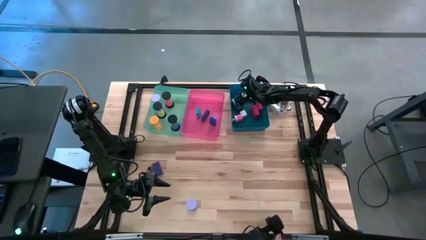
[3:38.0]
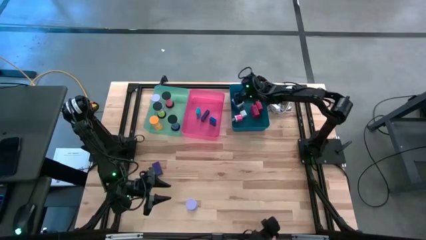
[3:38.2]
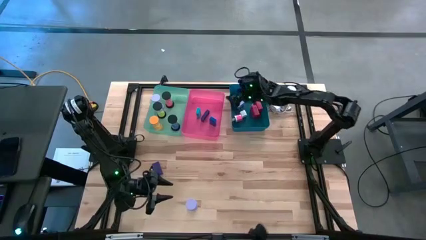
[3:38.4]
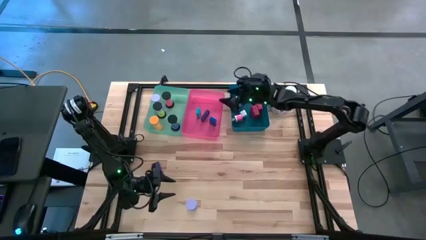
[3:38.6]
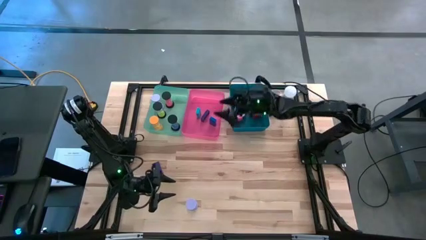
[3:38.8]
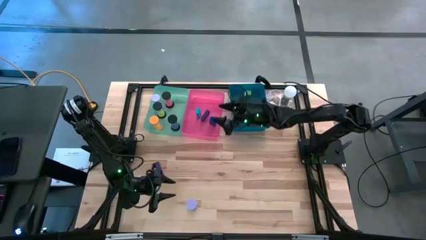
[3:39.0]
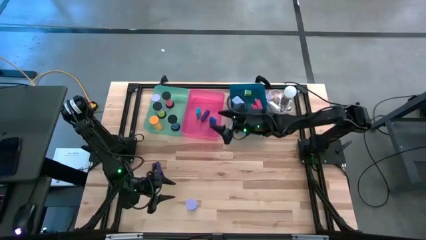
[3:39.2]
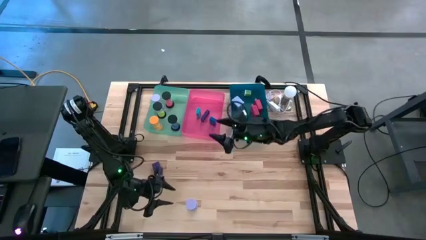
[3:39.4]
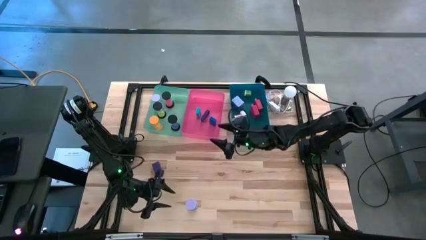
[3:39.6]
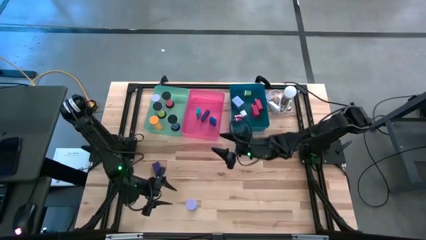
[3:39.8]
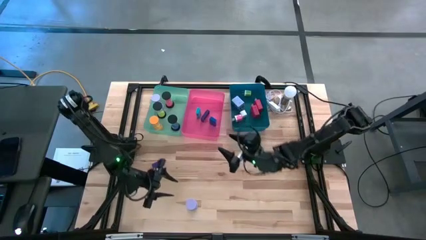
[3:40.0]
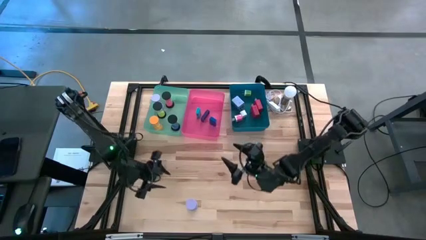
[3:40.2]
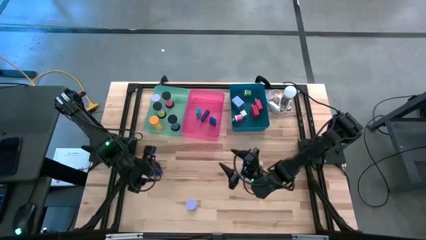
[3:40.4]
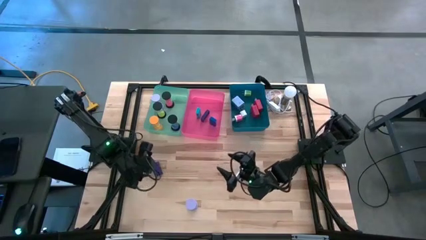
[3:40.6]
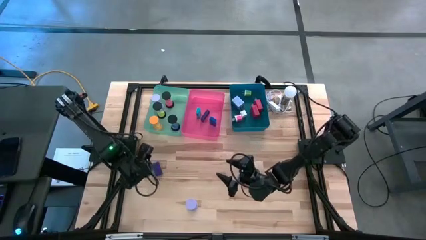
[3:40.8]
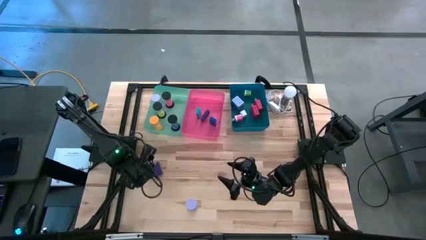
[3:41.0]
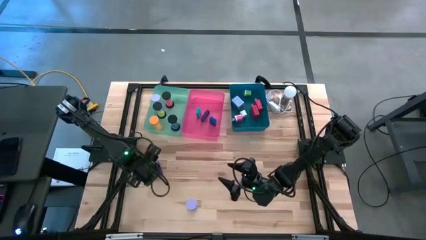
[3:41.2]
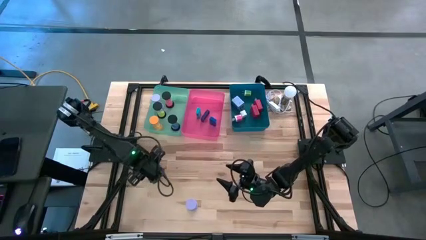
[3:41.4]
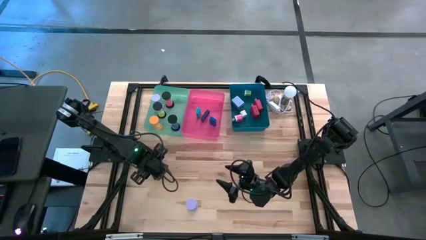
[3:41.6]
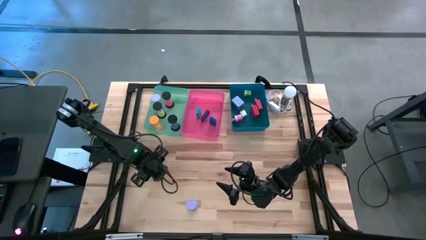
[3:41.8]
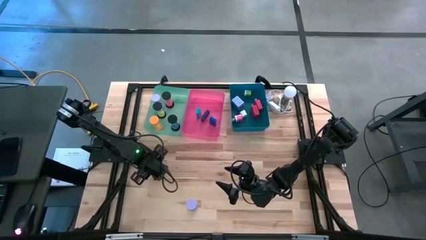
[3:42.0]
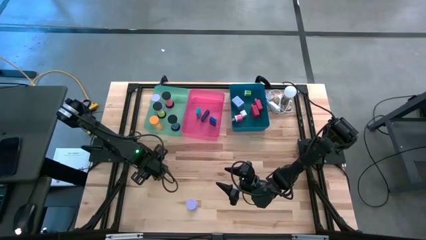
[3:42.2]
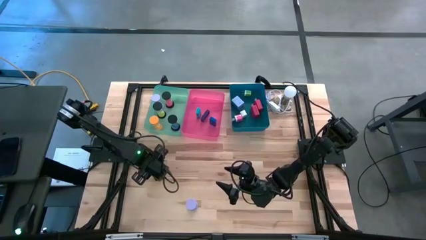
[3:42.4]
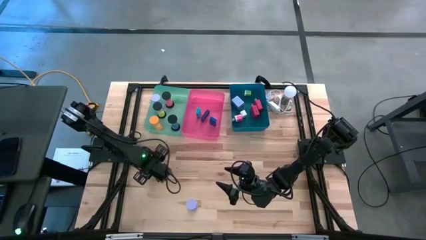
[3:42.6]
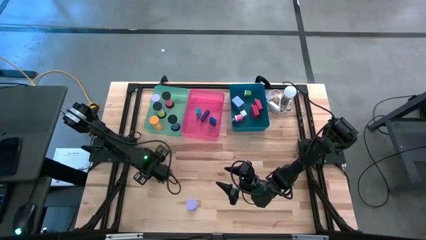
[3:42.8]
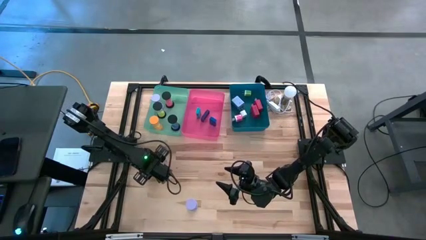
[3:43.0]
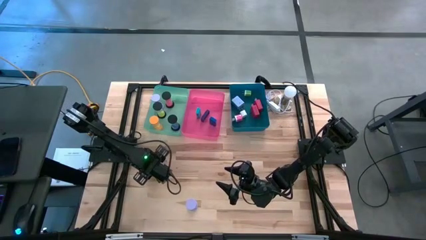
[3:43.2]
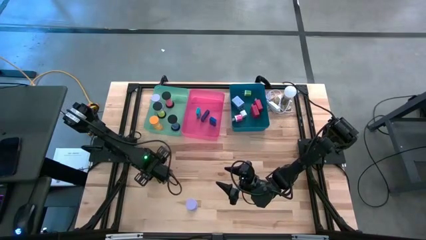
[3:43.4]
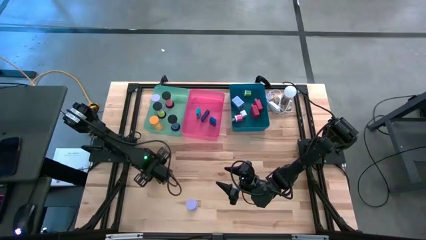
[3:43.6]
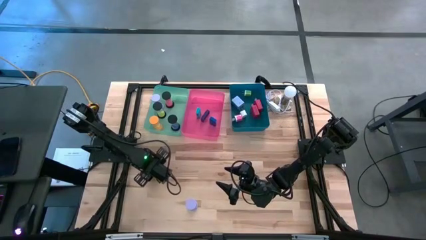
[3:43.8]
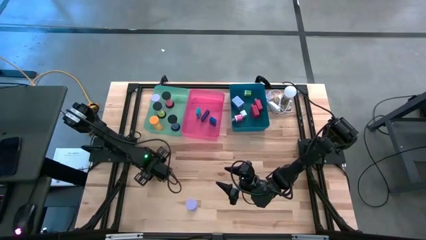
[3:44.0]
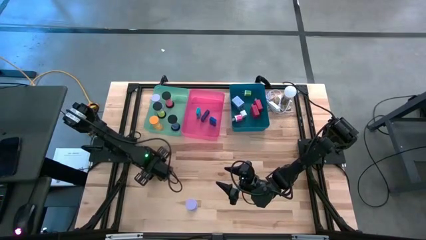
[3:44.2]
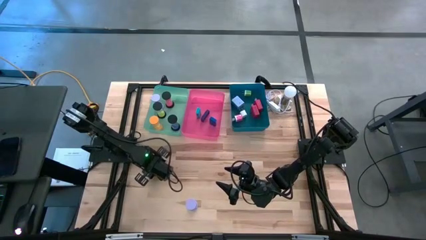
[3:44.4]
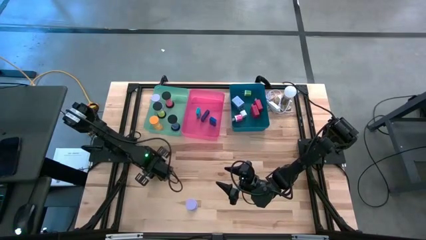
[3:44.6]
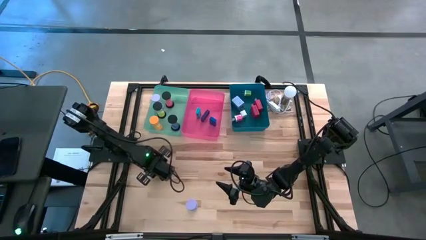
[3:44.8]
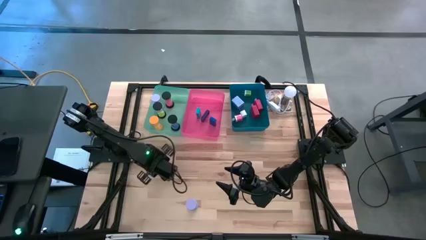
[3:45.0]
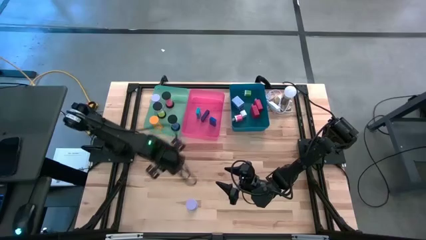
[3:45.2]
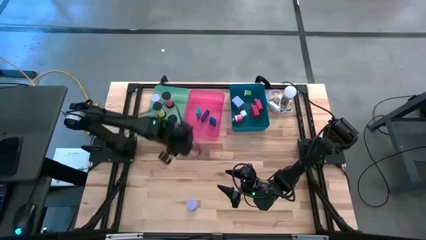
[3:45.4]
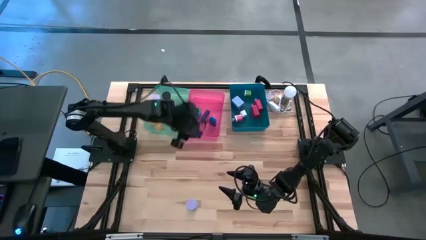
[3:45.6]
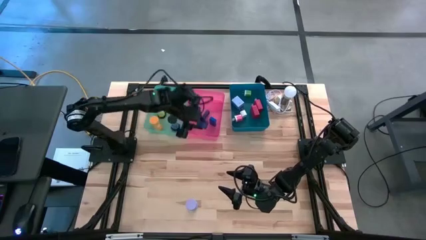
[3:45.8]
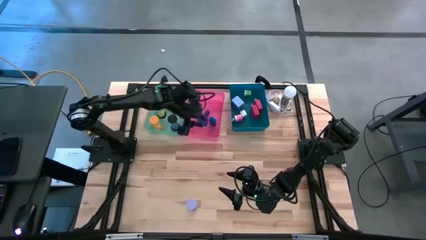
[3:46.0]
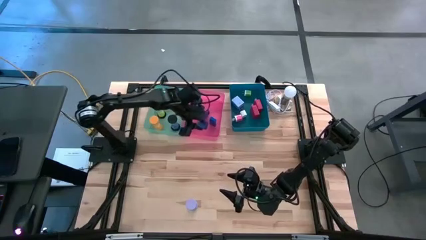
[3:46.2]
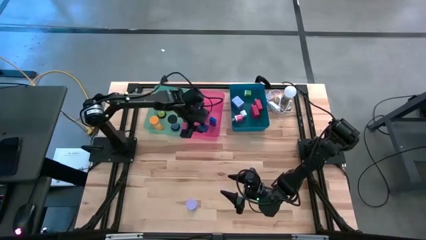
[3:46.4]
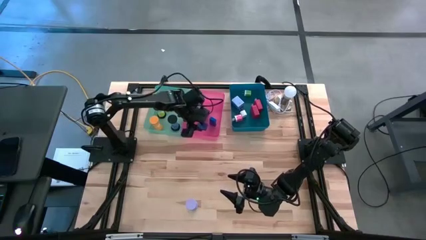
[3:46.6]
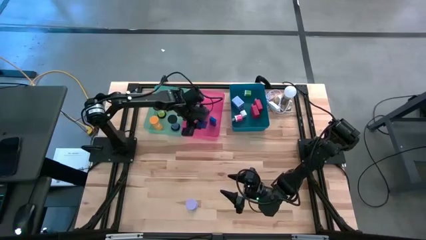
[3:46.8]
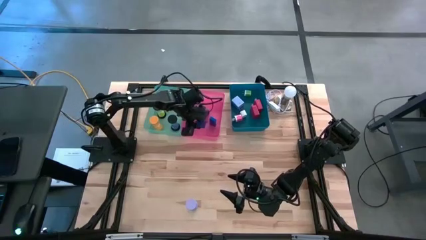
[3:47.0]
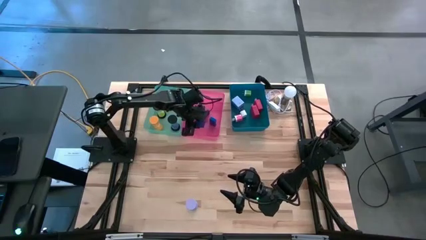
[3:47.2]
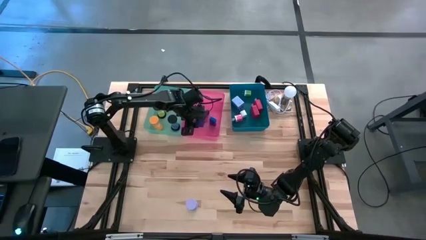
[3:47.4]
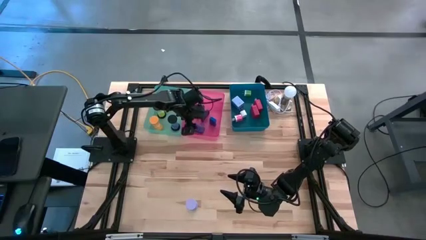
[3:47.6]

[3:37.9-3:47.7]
Task: Pick & Place Office items
Put the purple digital clock into the pink bin

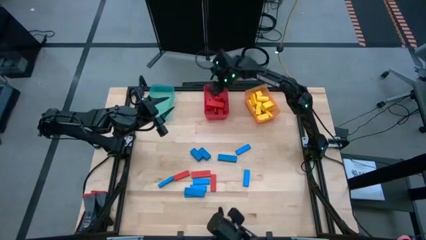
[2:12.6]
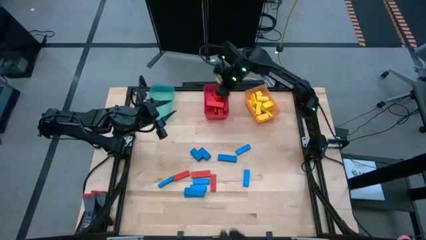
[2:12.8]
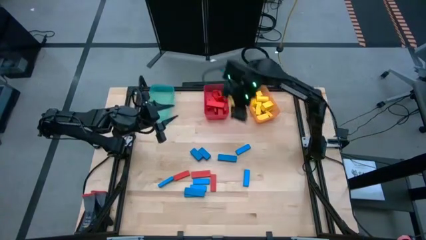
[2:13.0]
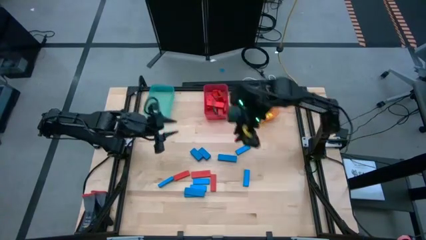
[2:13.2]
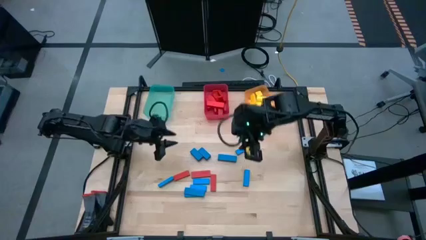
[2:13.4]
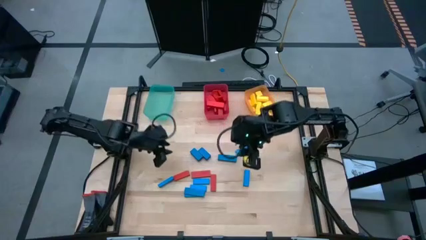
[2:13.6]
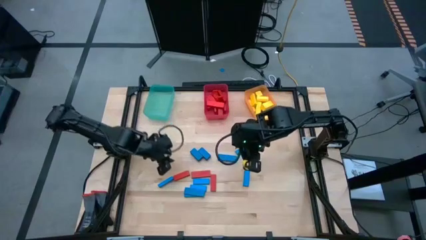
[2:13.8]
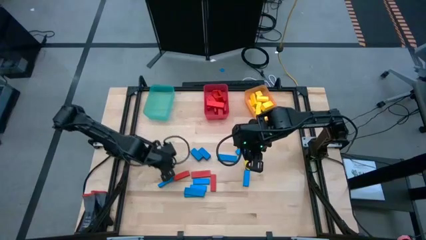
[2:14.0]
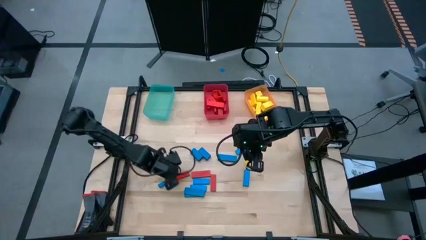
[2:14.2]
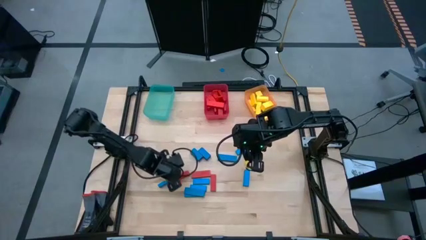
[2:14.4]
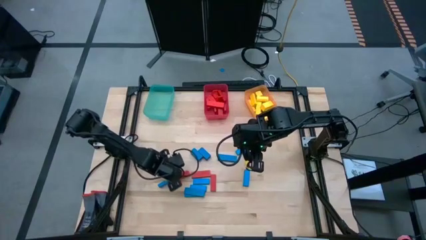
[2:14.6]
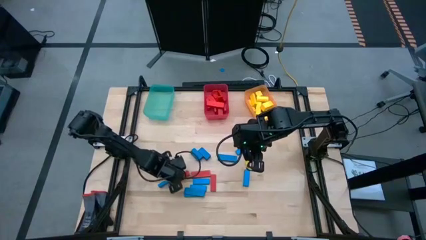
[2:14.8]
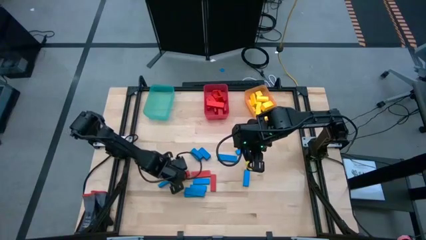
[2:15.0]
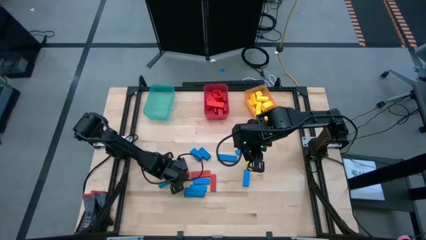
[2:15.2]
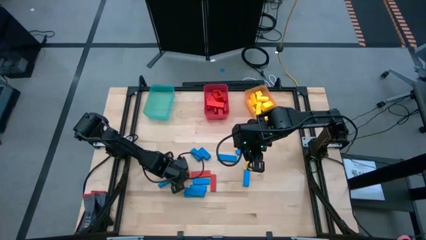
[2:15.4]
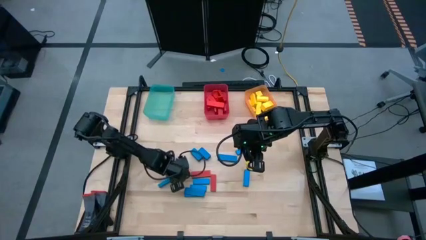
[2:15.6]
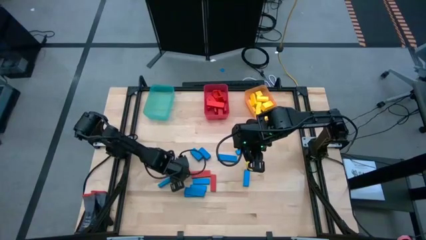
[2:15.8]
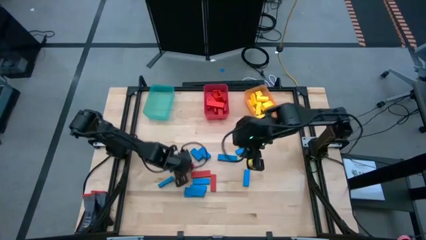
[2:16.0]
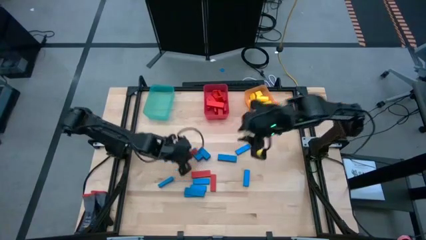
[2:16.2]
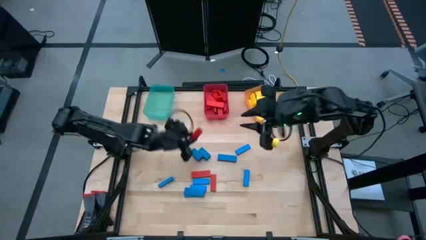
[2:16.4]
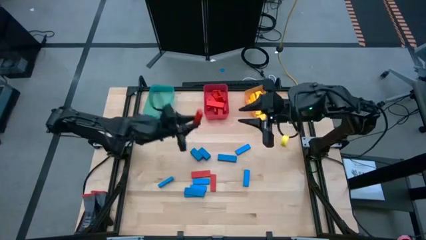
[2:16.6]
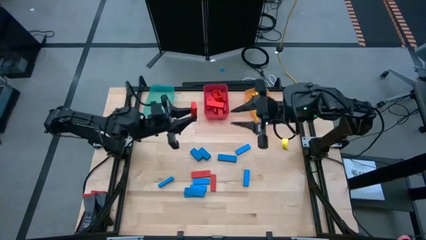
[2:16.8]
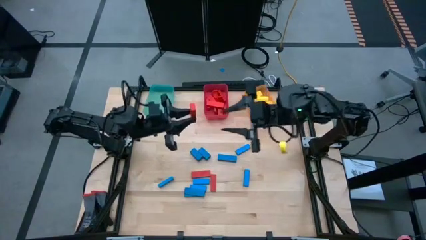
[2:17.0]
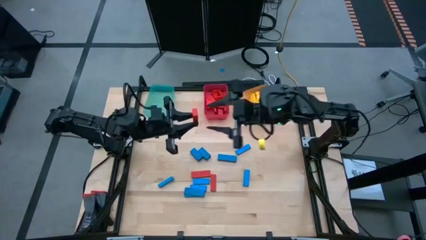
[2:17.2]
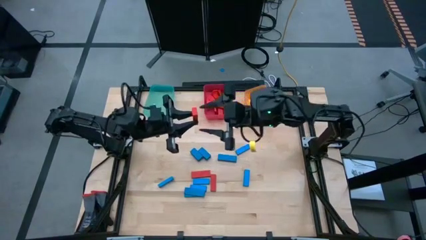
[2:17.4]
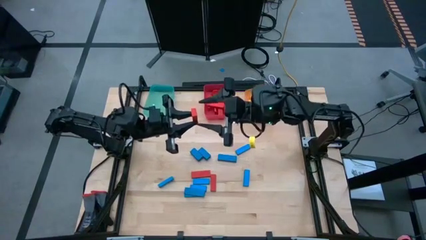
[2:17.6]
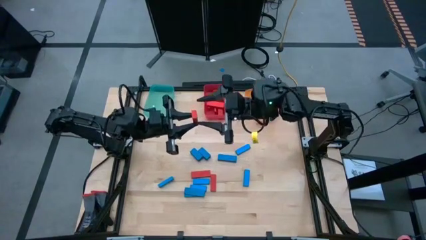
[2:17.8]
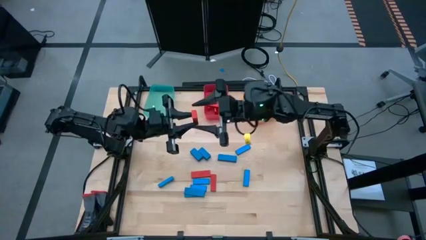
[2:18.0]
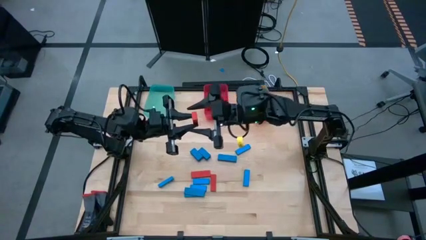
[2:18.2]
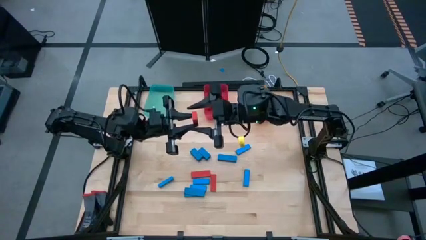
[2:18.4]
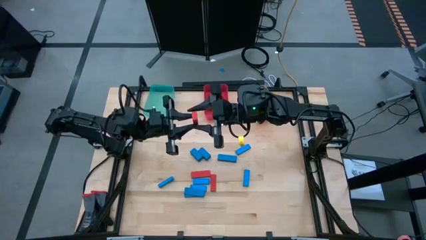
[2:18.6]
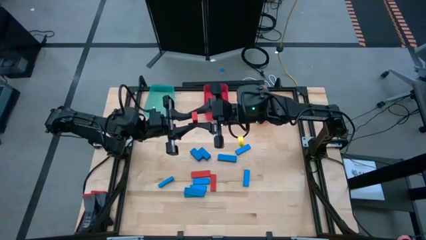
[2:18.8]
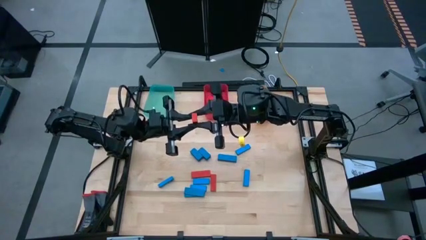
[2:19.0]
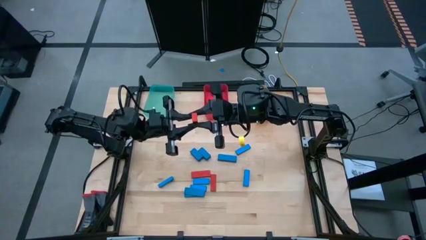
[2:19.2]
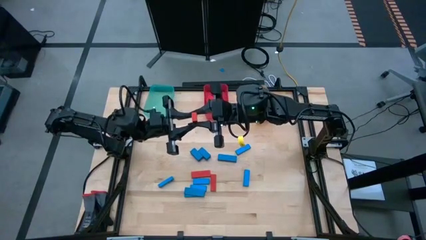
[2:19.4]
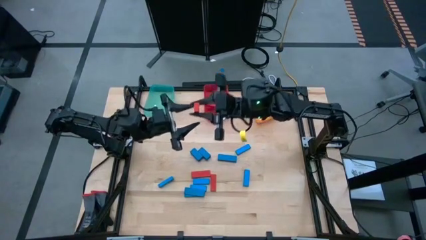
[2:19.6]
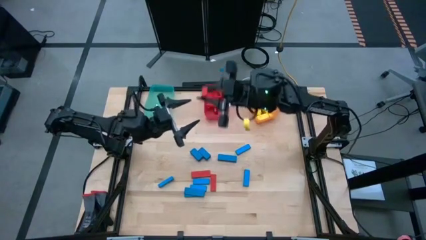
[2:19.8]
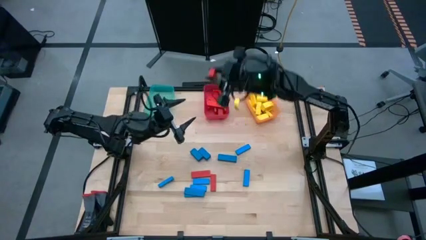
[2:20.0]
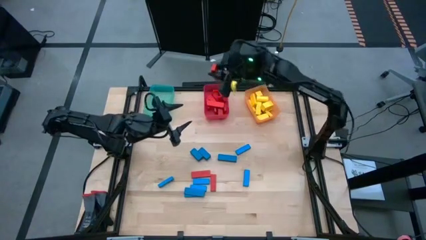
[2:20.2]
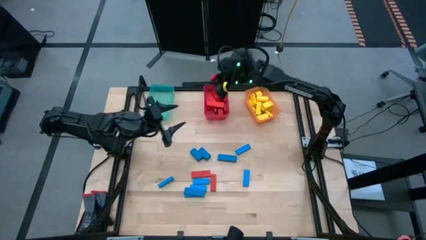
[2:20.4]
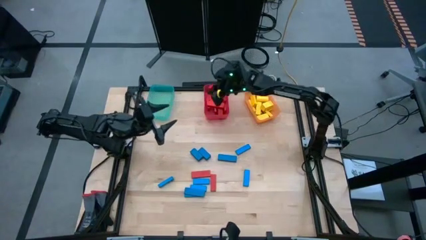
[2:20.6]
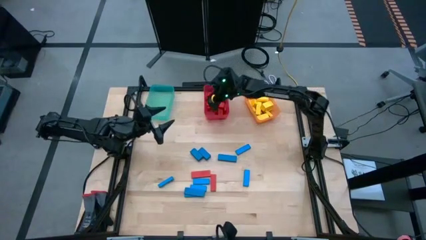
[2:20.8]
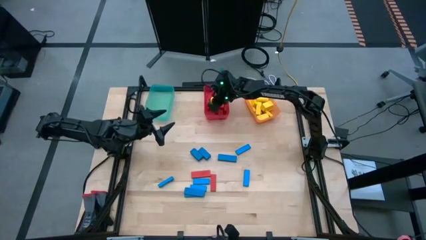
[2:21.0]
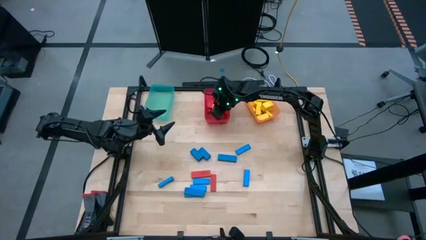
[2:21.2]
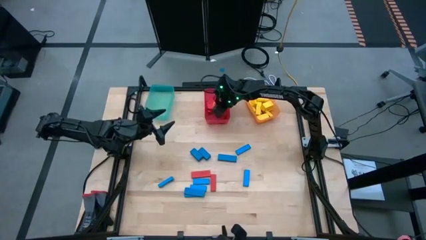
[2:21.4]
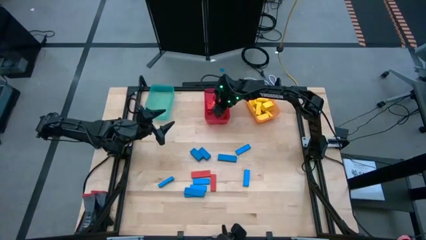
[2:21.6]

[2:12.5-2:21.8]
Task: Sort blocks
Put the red block into the red bin
